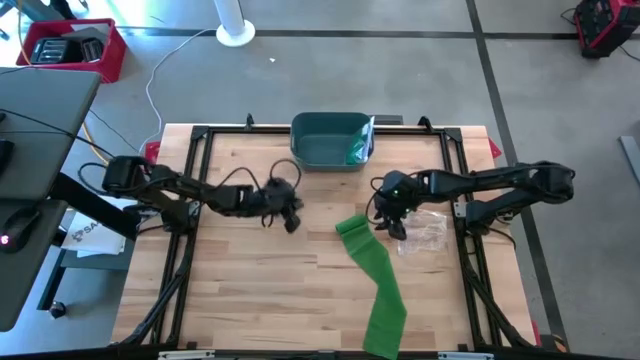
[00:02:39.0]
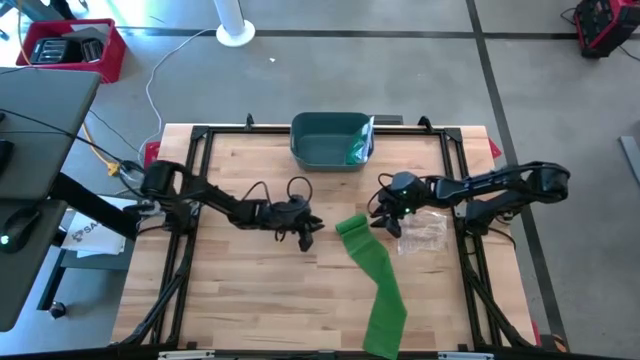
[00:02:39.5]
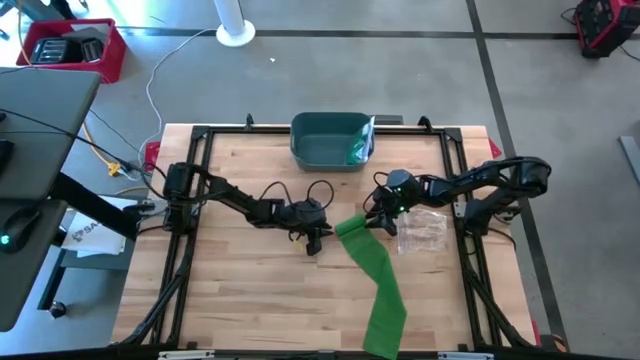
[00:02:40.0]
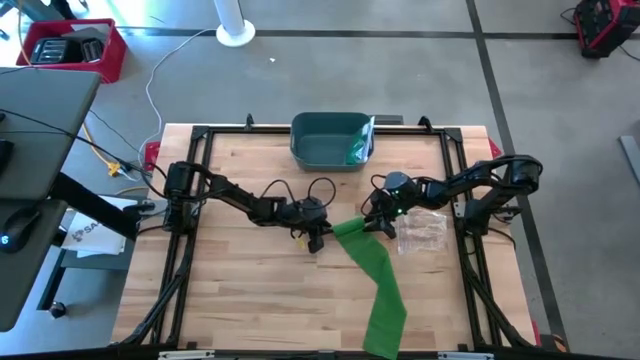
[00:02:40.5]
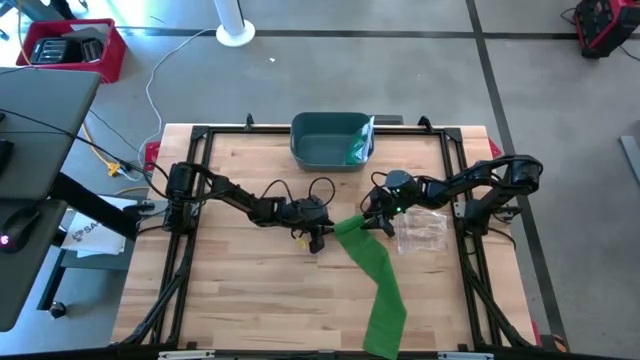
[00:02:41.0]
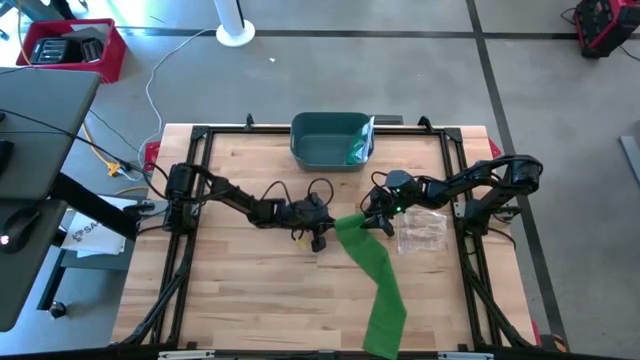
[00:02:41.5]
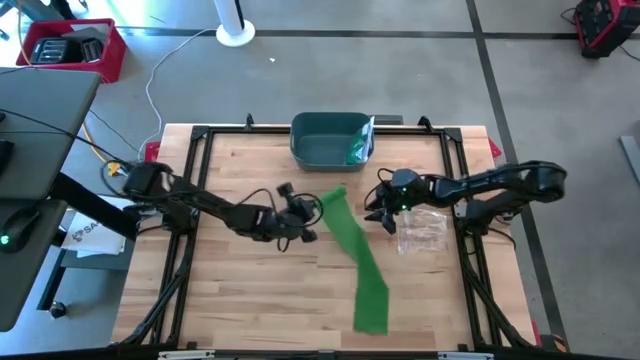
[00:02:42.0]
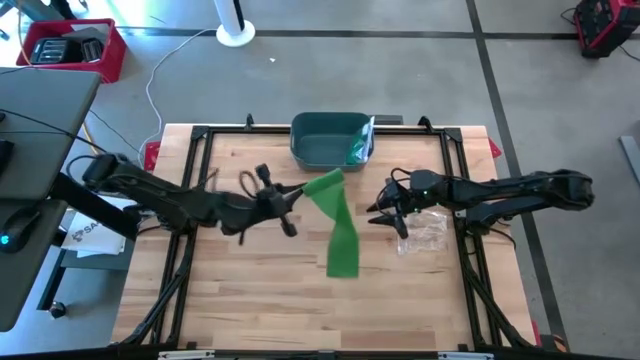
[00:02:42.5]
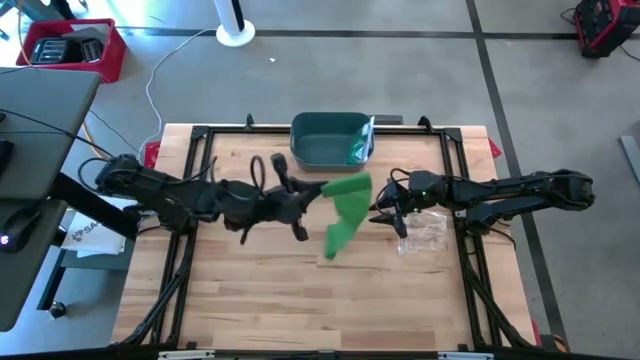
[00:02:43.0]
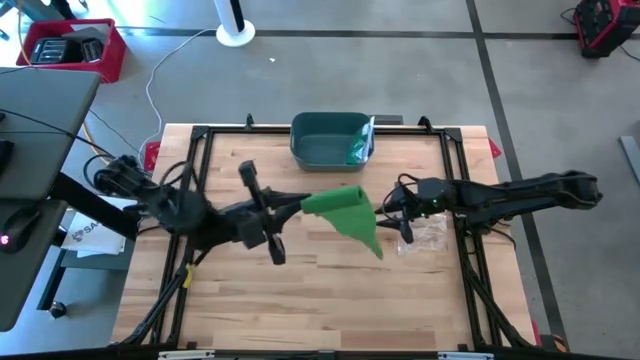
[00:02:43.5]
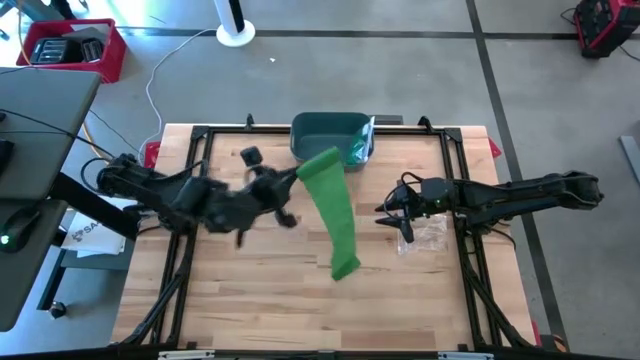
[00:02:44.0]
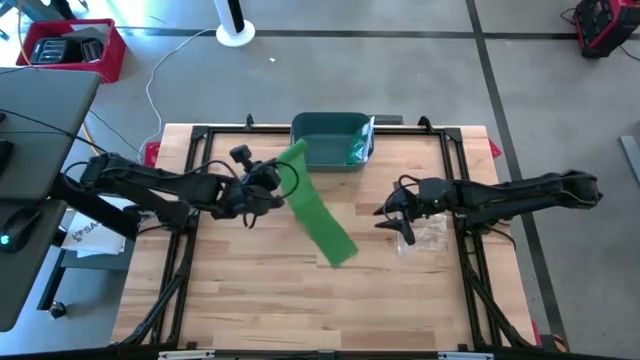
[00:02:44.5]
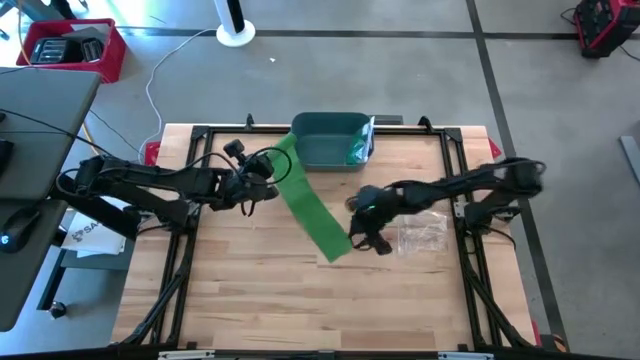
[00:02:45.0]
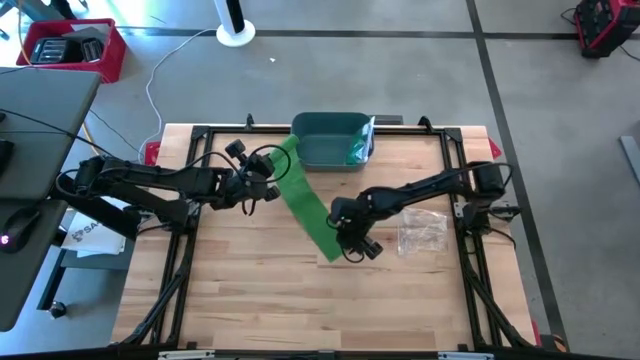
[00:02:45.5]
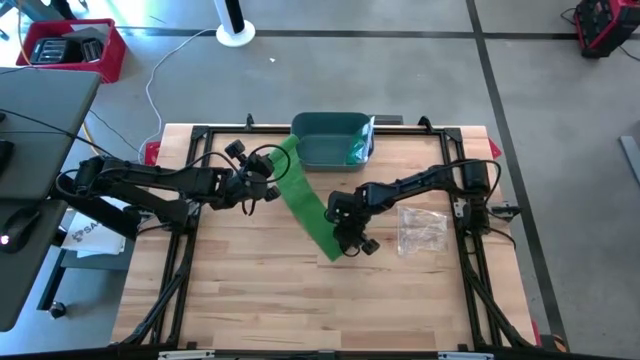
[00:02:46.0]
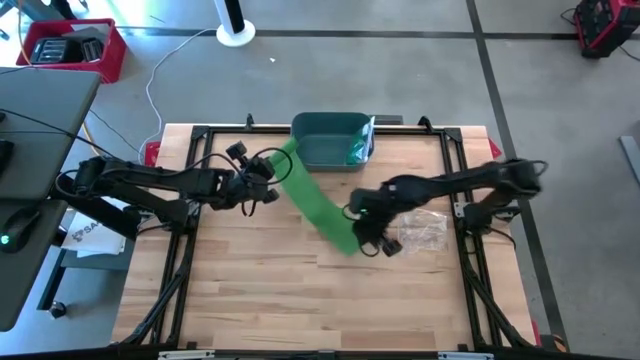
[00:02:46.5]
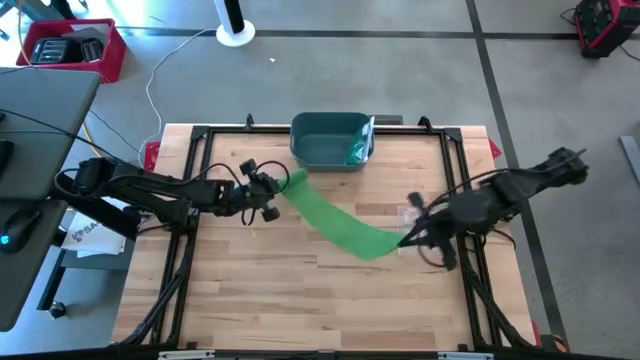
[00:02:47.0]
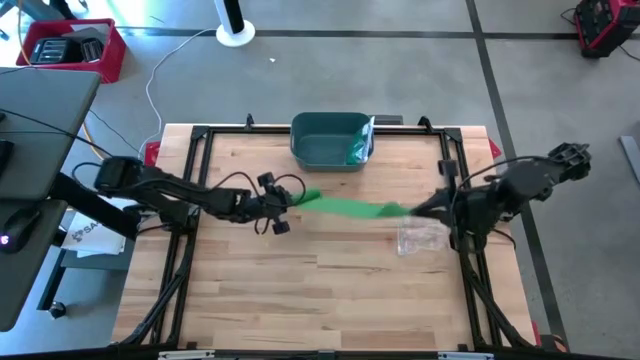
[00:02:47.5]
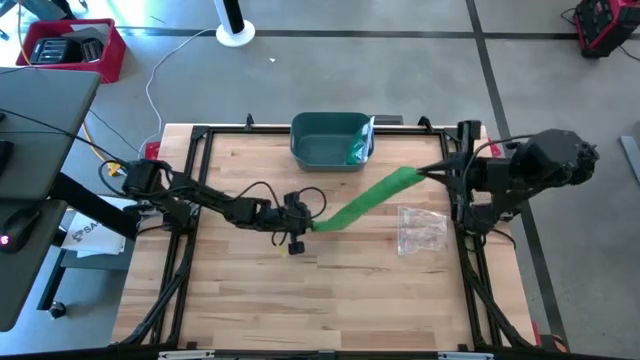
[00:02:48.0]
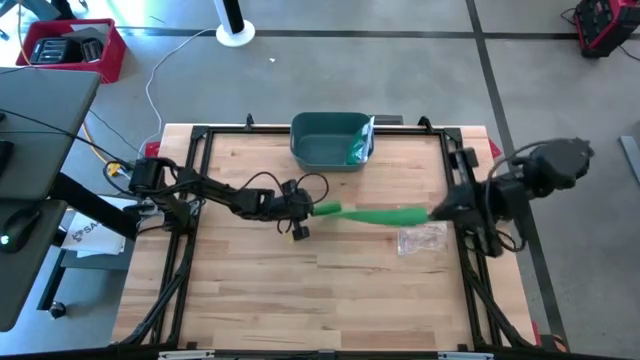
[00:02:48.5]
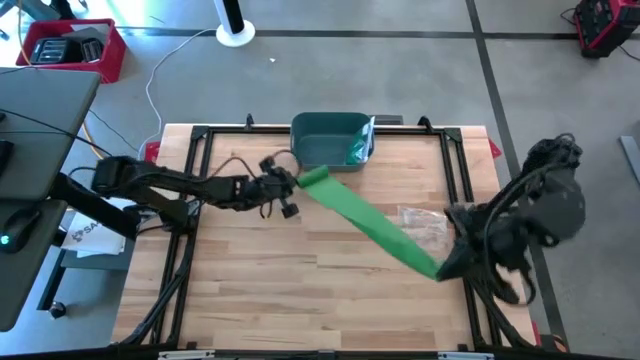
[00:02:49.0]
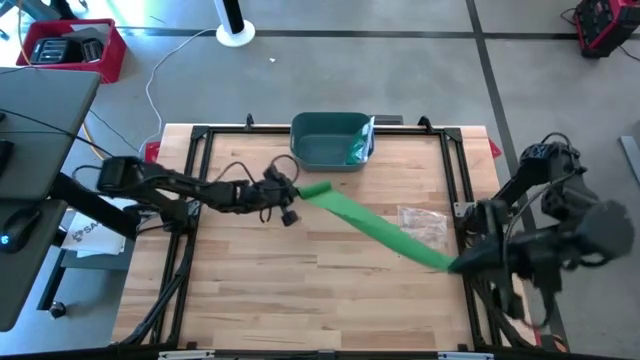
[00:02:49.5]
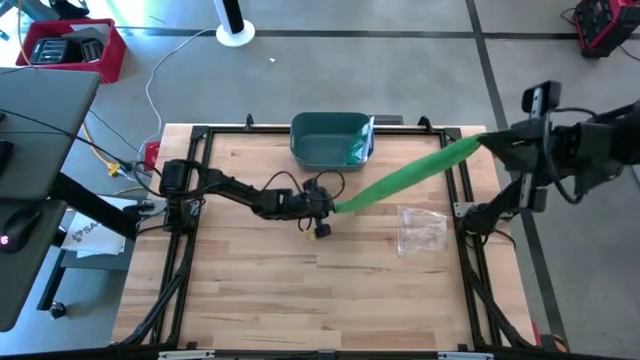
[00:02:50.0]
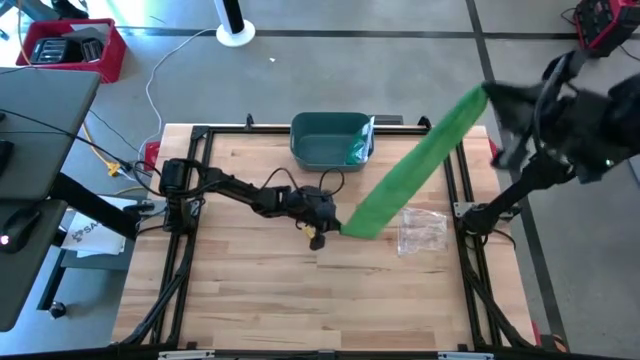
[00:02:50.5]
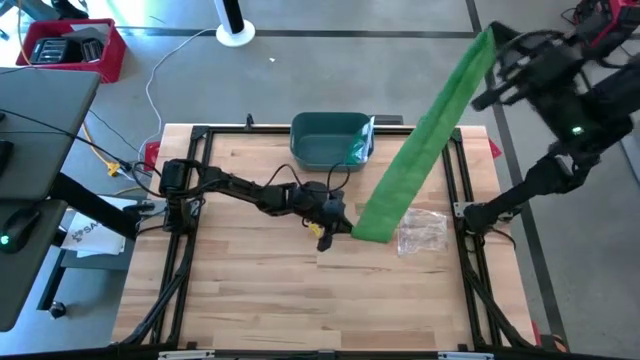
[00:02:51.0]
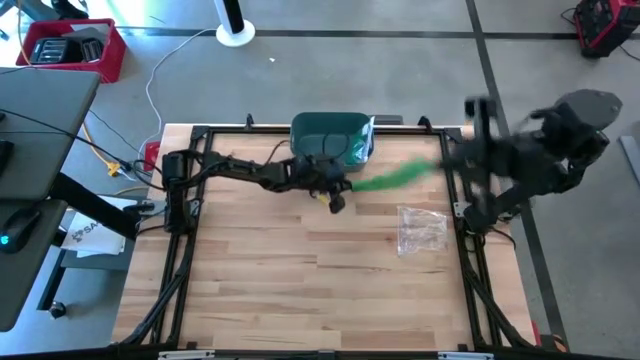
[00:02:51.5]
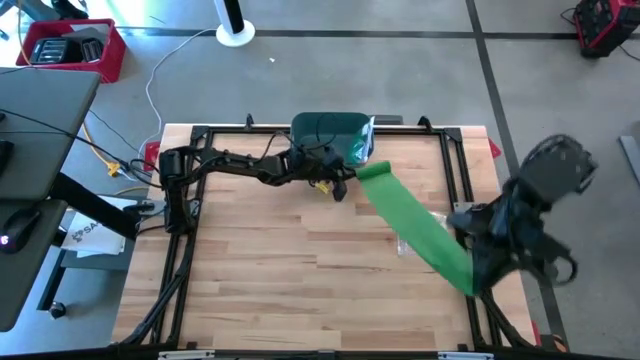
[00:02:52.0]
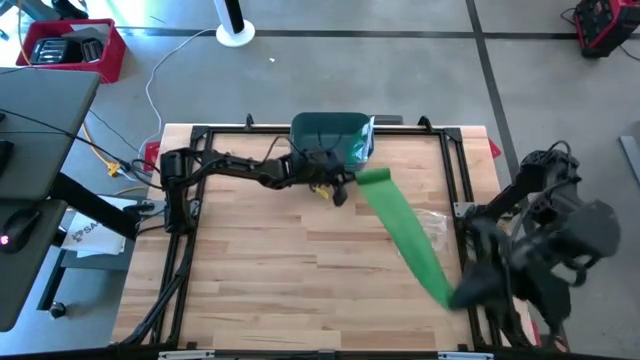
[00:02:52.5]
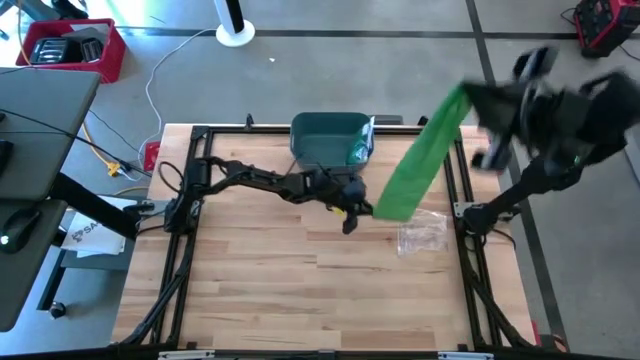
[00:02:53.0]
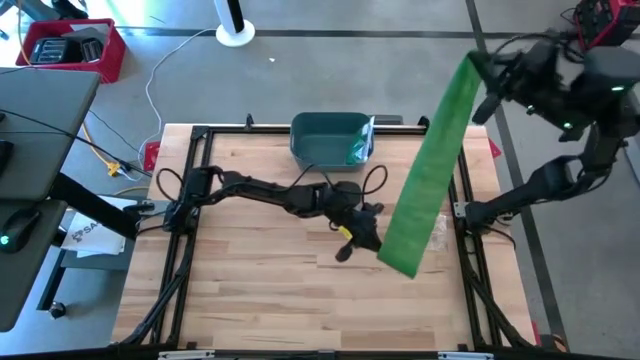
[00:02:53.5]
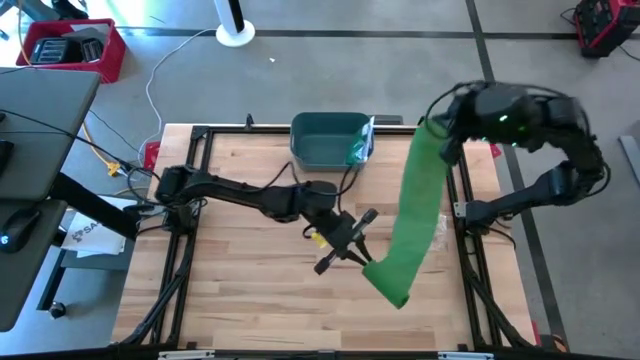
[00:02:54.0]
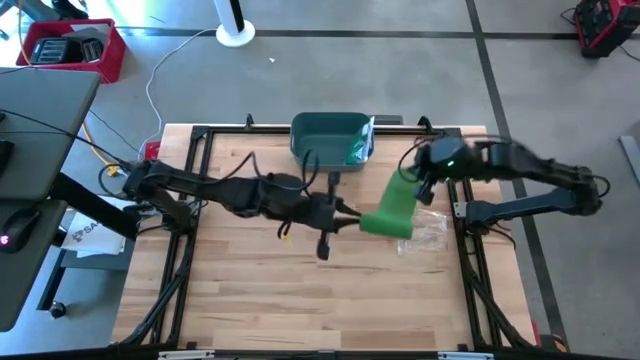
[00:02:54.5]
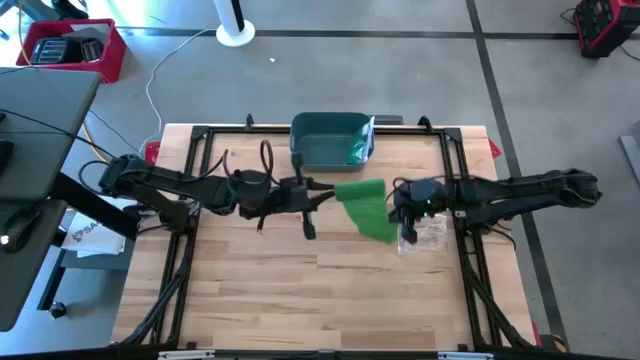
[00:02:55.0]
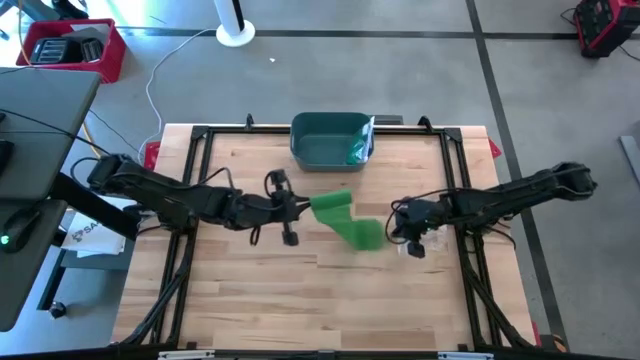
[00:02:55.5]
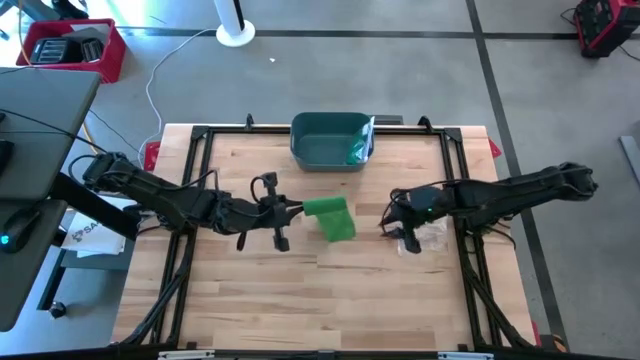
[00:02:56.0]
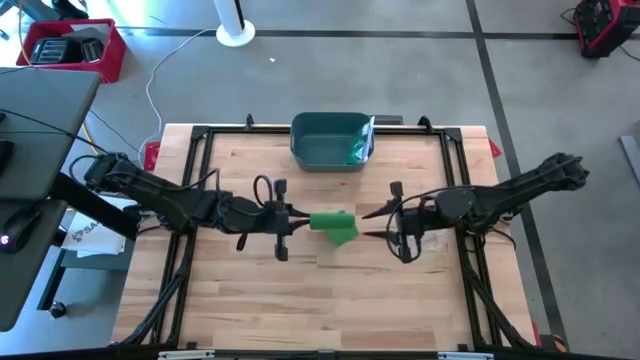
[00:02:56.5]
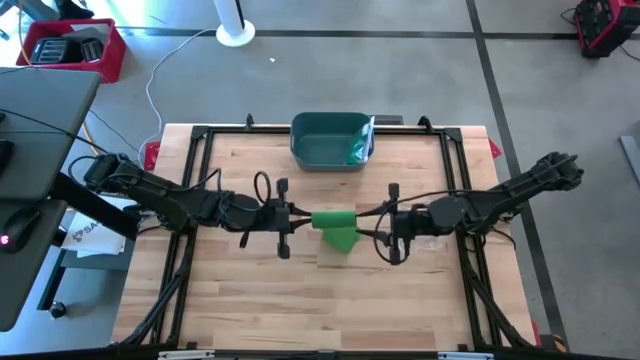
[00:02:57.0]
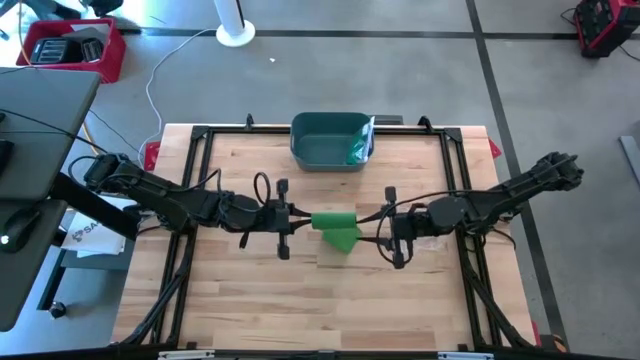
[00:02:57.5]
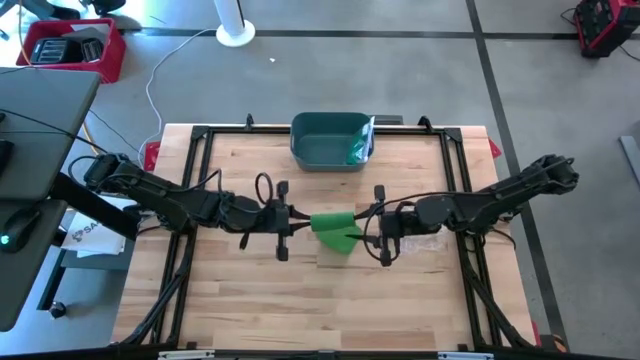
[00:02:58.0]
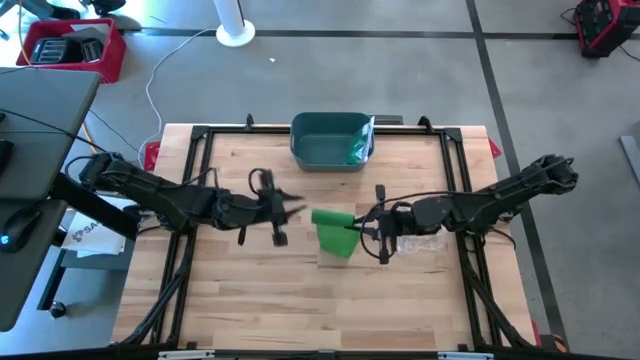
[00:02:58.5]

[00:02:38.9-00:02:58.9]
Task: Roll bandage
Roll the green bandage
